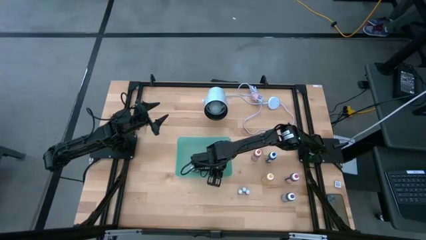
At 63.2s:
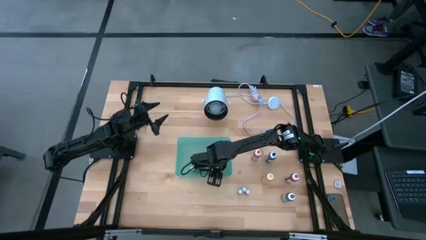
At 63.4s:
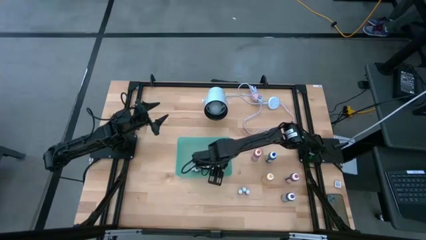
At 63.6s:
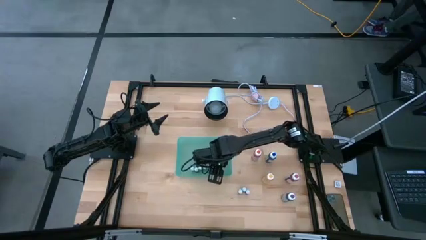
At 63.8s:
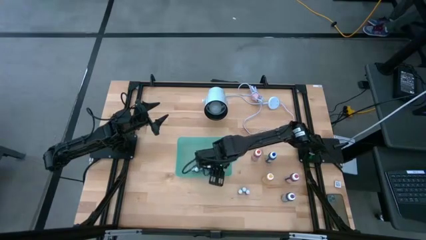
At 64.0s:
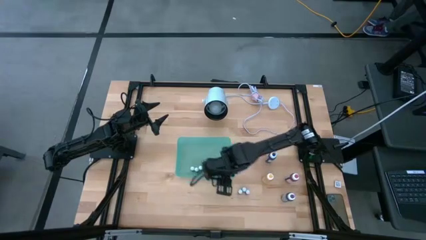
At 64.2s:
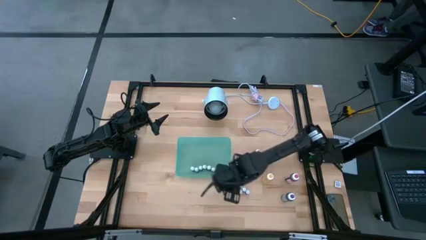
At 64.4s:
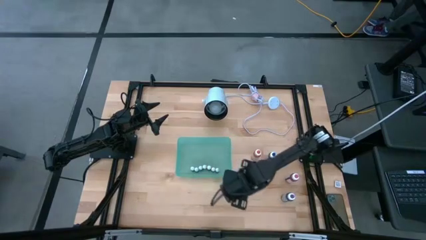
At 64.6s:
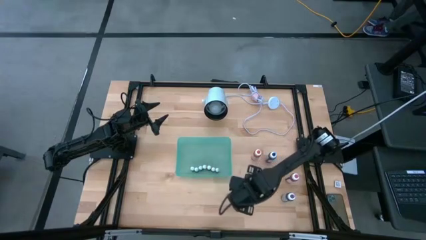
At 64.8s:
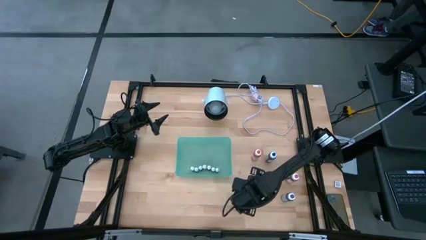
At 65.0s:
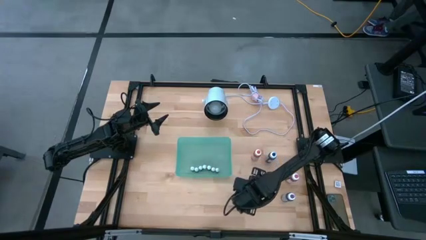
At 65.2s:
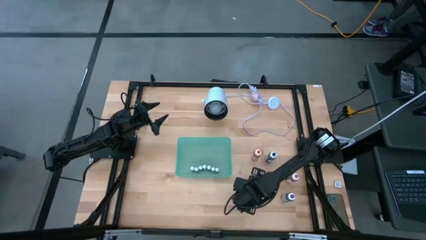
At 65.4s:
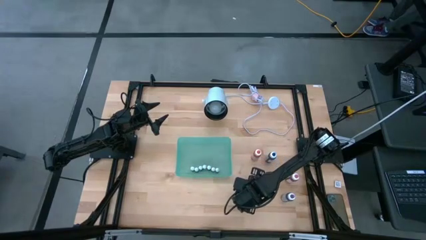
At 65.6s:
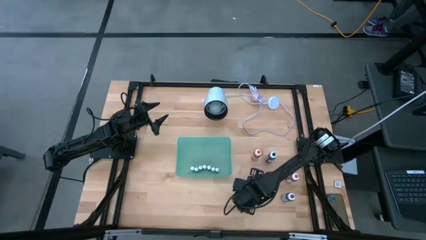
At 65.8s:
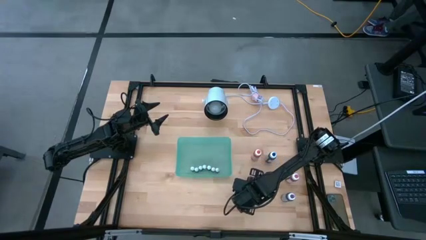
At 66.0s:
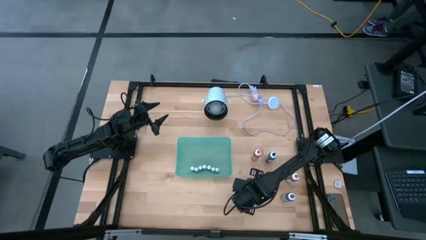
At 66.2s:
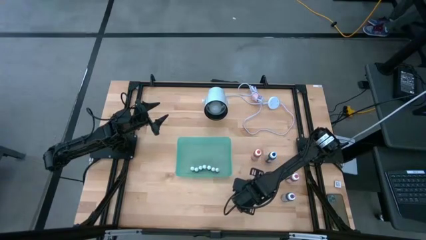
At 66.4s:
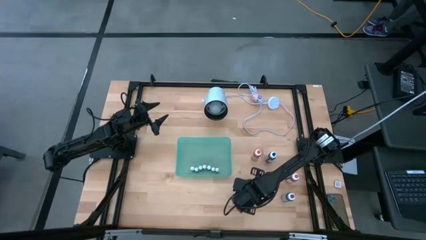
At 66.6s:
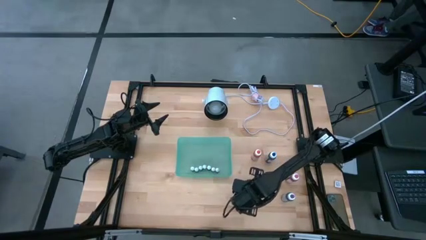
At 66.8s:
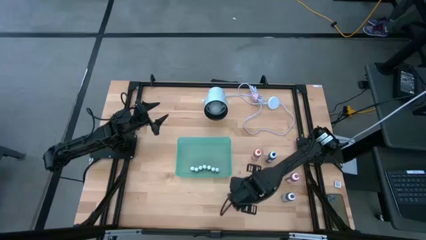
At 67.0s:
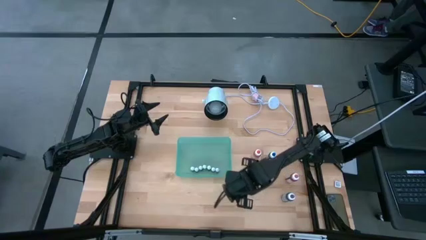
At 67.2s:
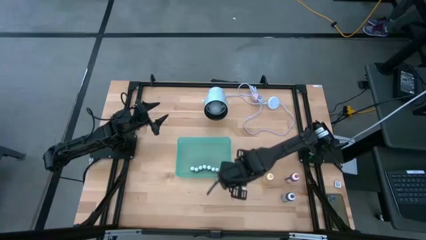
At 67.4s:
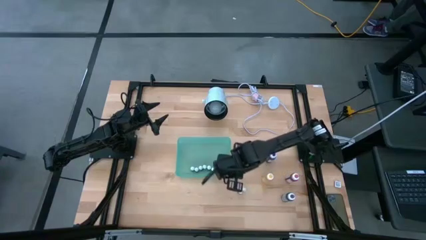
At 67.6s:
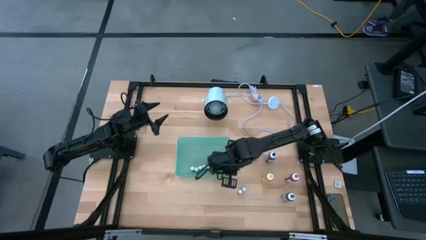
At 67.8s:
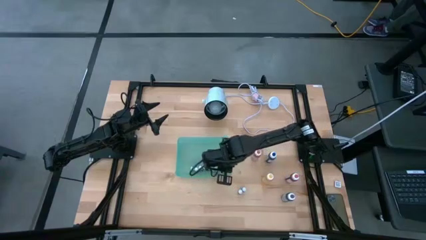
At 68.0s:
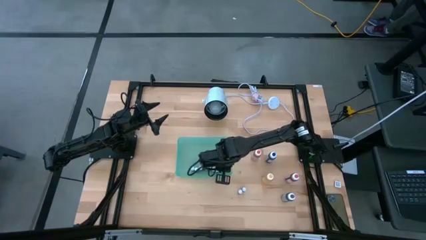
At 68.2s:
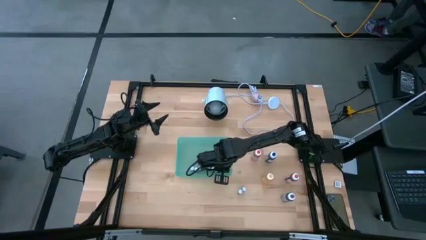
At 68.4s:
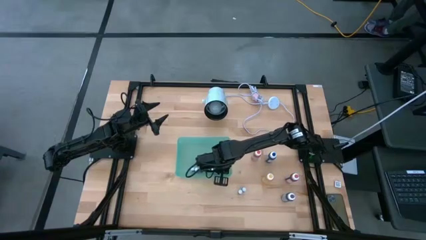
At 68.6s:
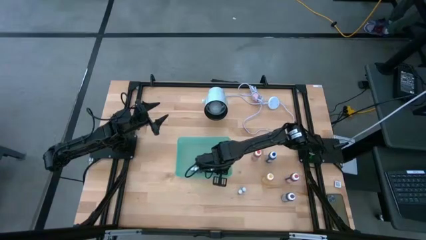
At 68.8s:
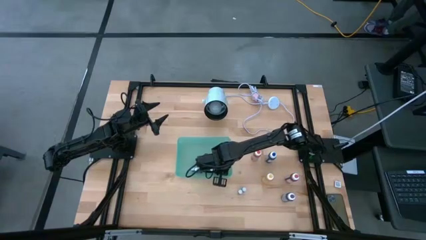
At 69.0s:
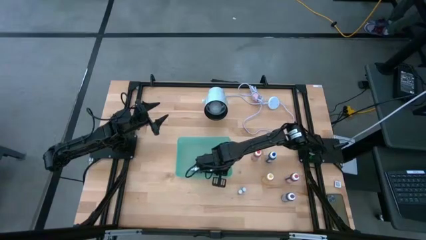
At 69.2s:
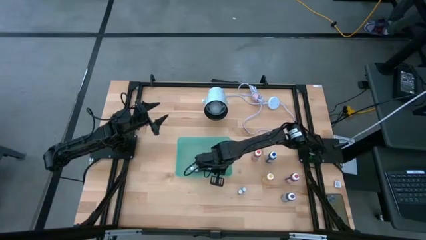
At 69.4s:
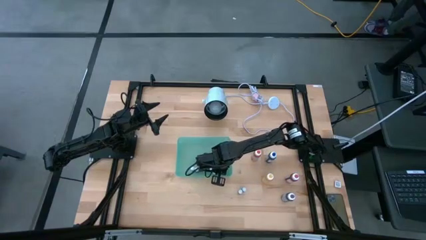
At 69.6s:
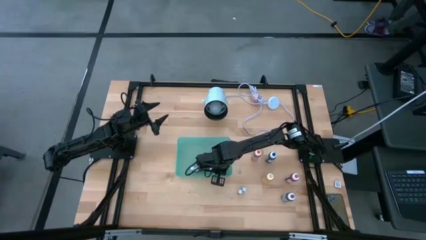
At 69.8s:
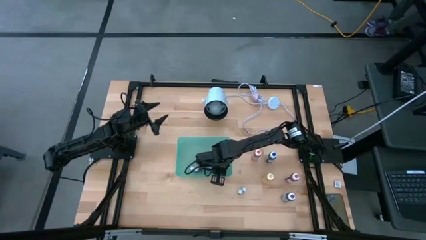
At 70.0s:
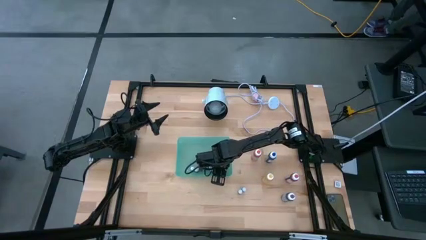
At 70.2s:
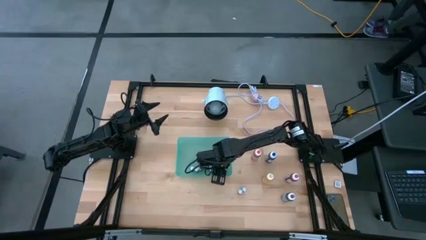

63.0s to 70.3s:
Task: Pick & Place food coloring
Put the right small black food coloring bottle into the bin

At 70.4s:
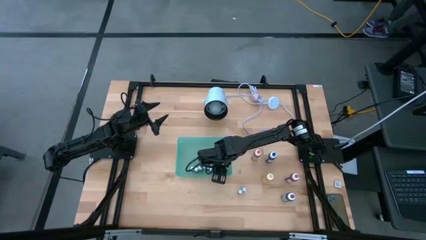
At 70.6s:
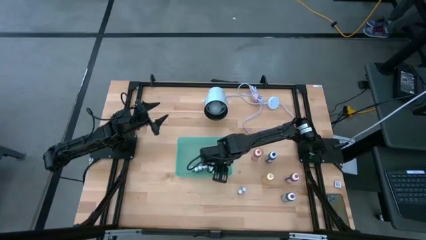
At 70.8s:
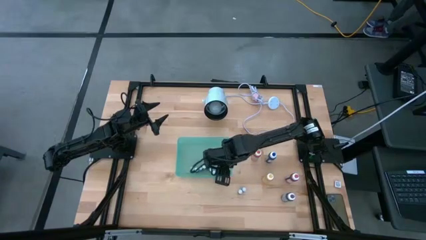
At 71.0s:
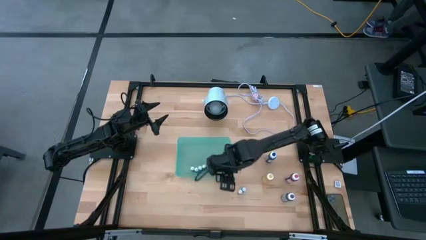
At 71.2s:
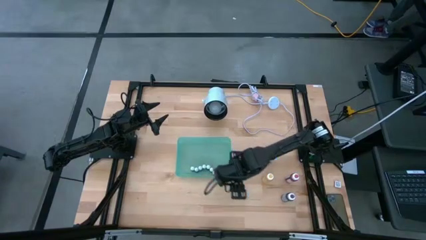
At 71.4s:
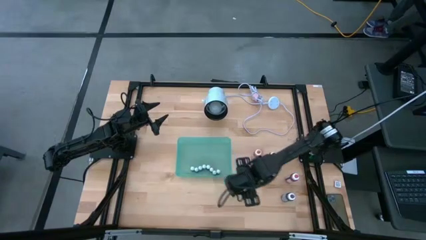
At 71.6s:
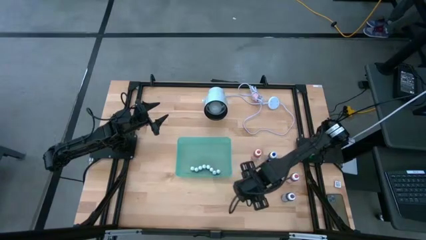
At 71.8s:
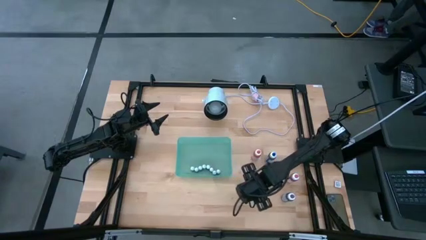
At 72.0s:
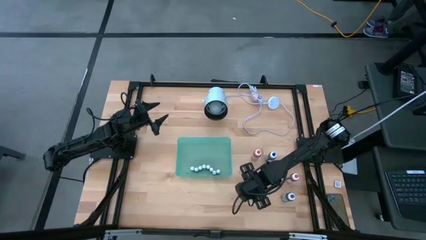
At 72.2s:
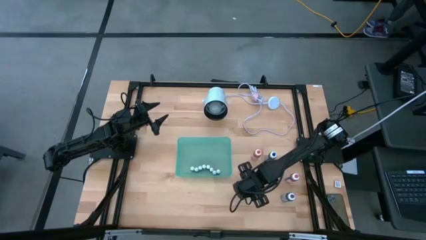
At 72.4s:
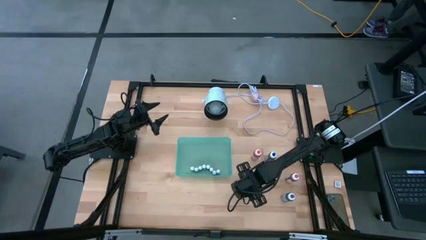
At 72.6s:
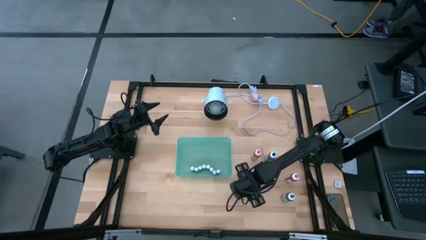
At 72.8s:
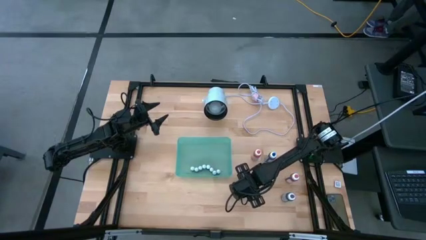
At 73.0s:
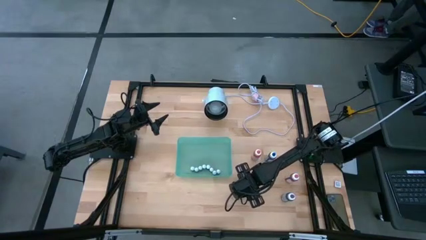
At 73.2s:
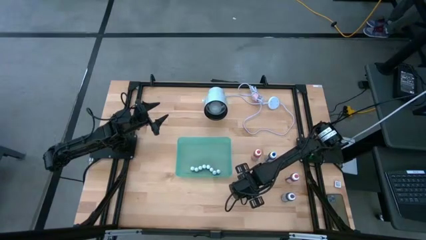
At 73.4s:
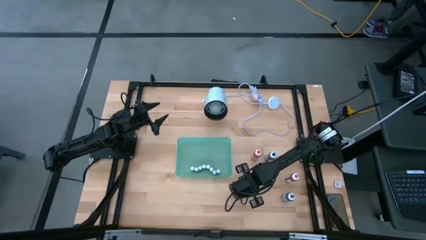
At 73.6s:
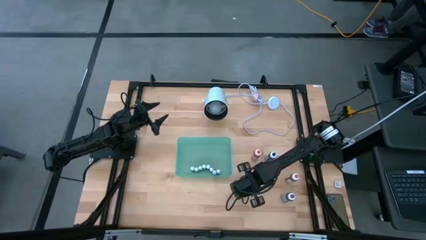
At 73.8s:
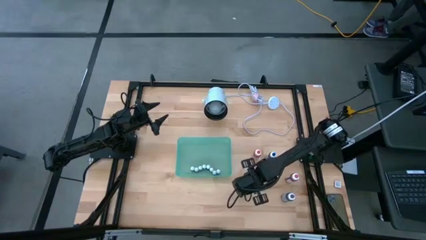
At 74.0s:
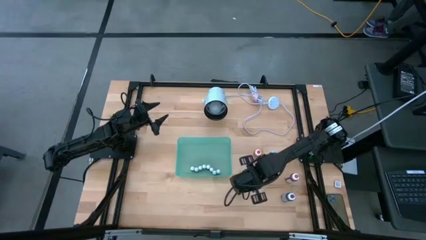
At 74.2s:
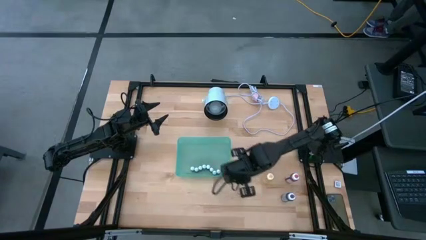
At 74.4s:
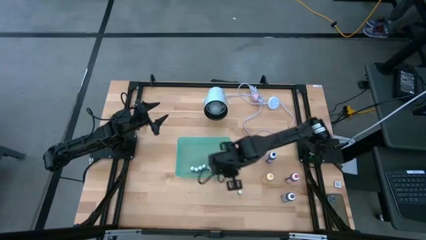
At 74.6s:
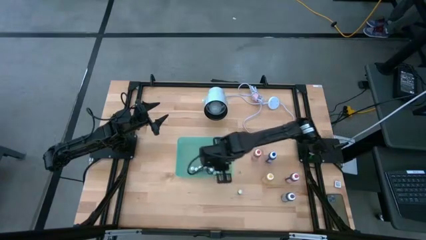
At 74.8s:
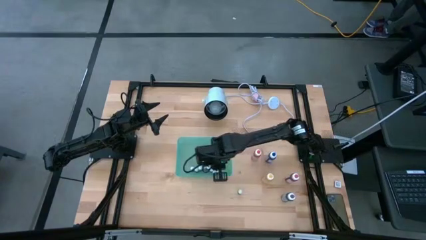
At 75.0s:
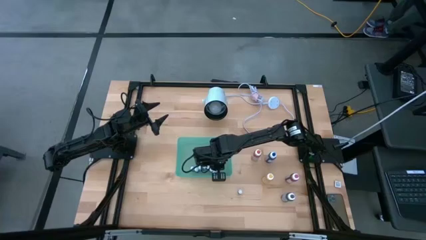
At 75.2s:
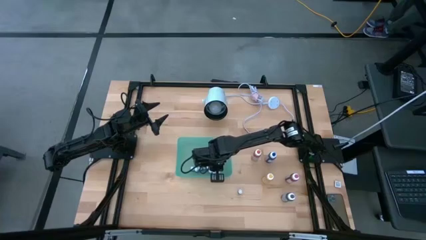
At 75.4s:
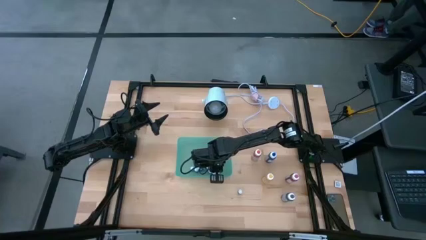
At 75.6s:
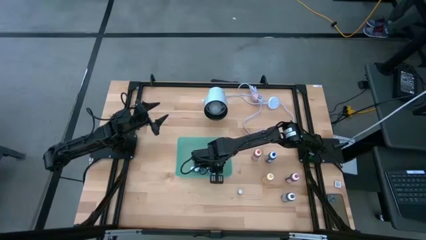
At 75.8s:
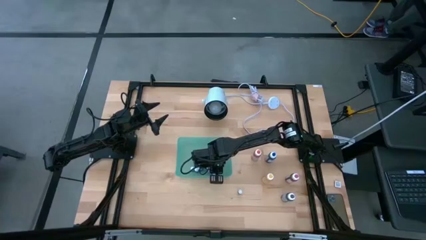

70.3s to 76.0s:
Put the right small black food coloring bottle into the bin
